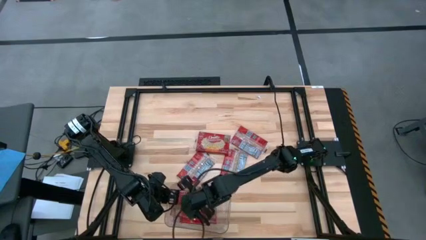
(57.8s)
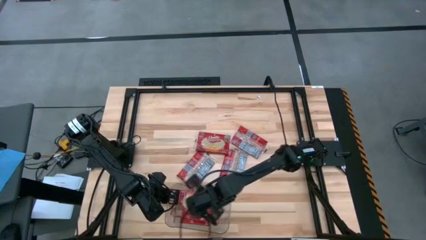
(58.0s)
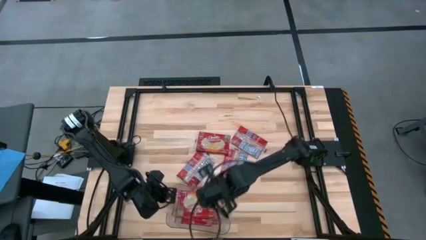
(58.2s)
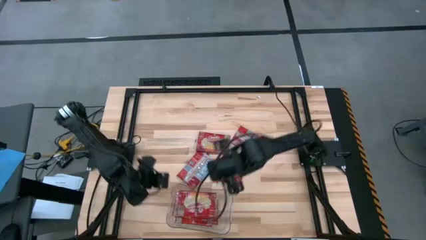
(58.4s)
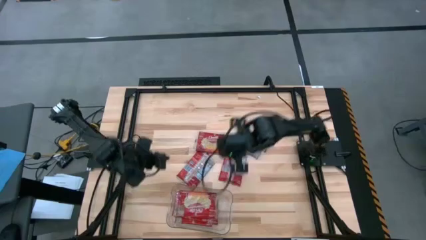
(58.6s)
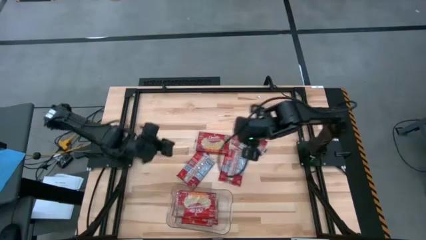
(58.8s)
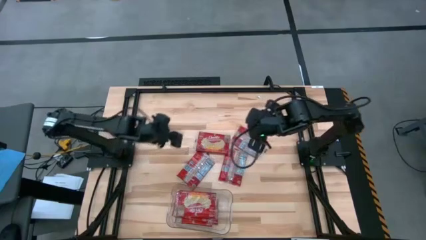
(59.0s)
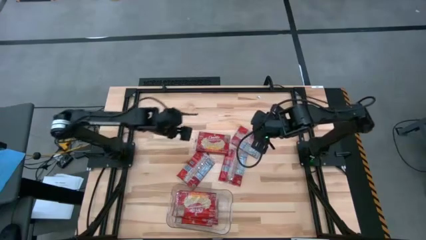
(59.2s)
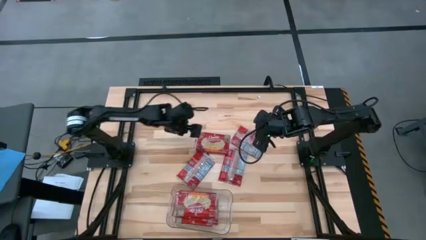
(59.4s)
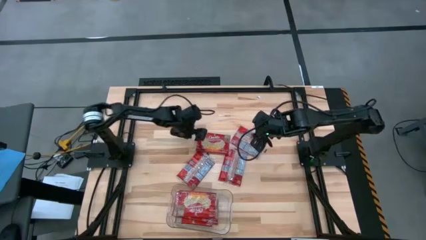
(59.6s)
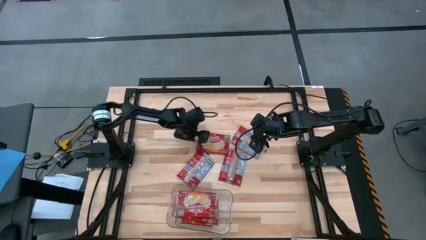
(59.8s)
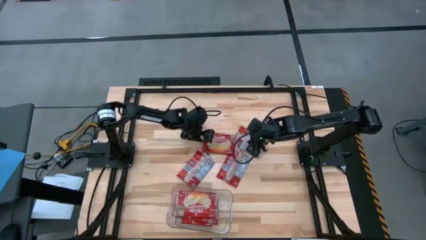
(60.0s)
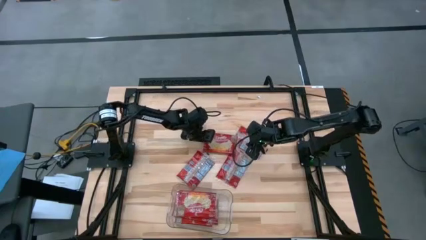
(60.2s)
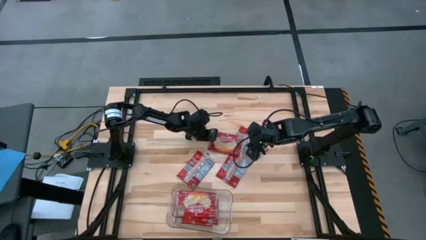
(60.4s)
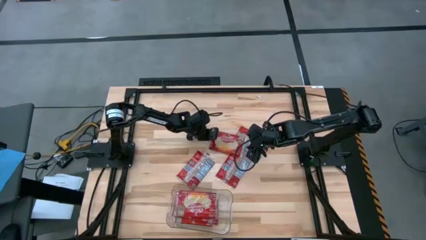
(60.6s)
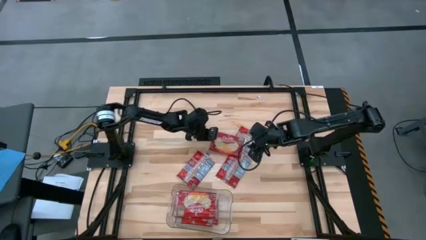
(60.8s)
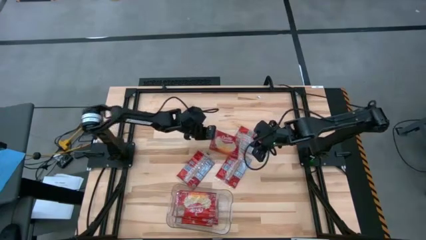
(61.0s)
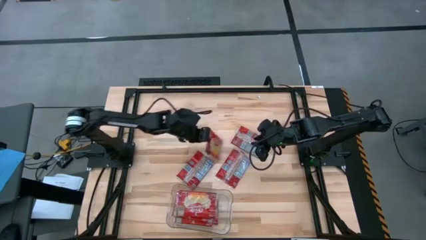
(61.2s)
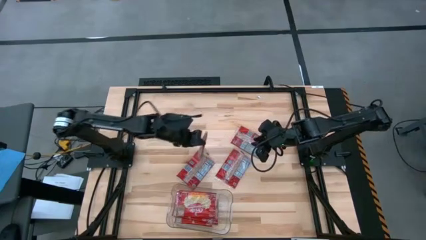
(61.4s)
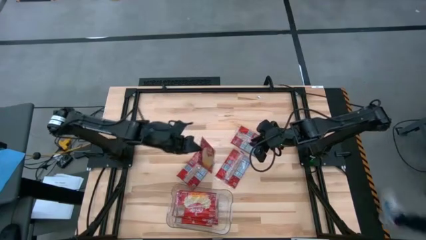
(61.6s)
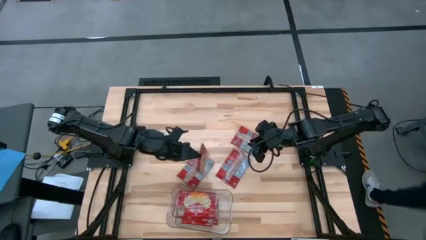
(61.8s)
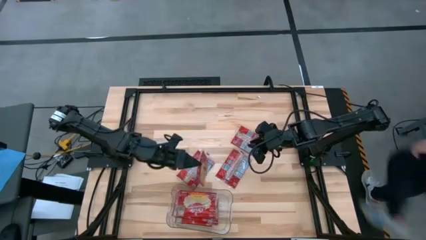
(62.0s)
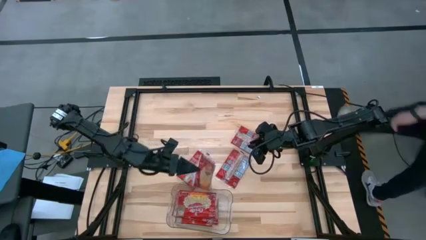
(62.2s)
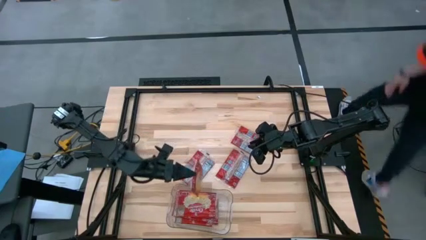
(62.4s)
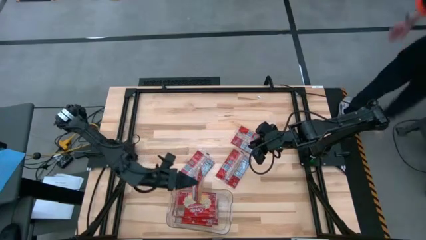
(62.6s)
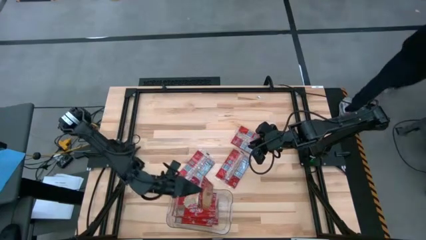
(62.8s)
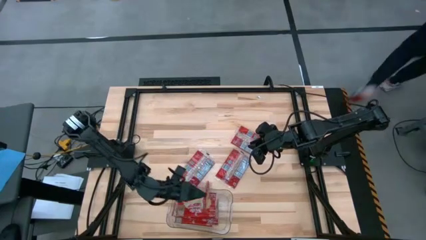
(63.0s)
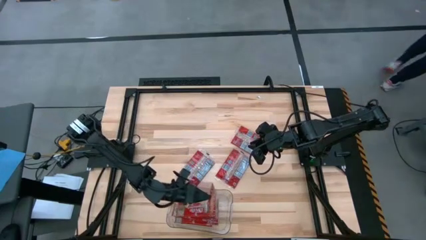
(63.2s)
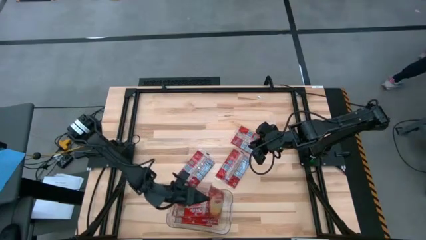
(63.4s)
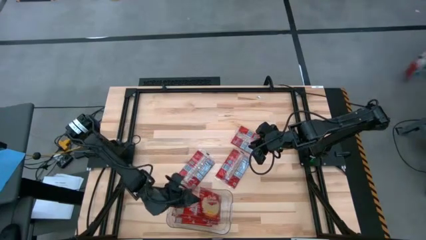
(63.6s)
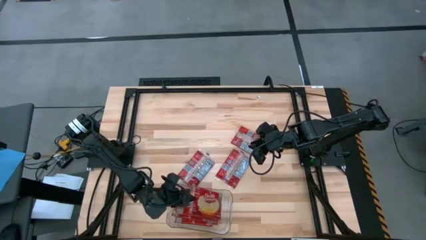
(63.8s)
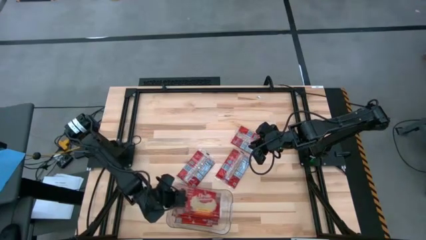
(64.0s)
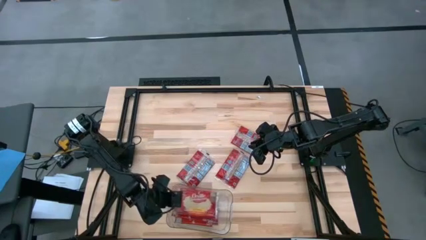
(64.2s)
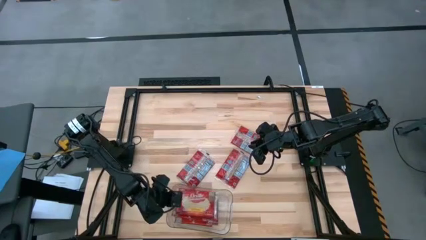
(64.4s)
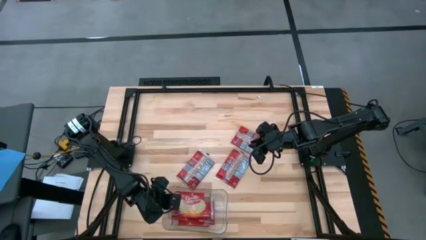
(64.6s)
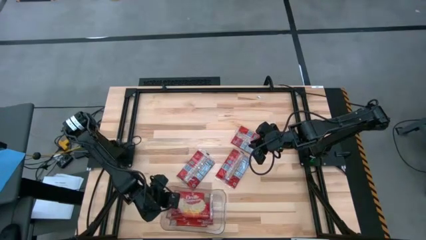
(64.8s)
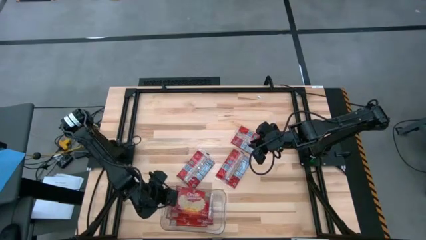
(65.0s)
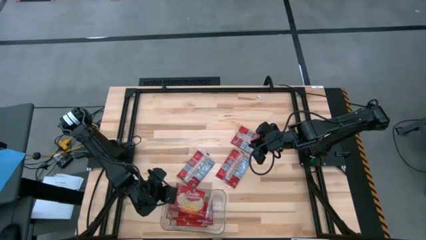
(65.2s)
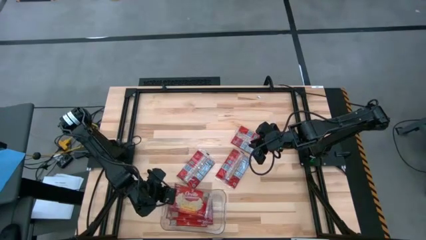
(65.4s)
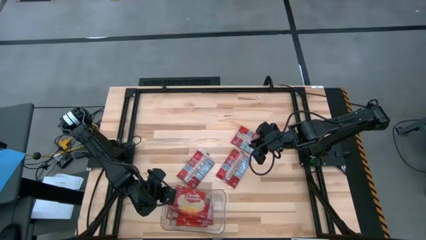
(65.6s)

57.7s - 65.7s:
Task: Sort popcorn bags into baskets
Put the red popcorn bag into the transparent bin

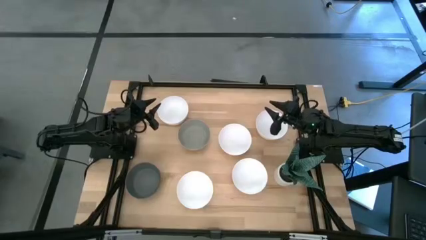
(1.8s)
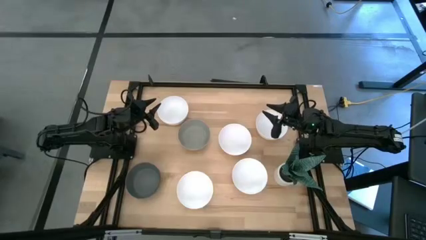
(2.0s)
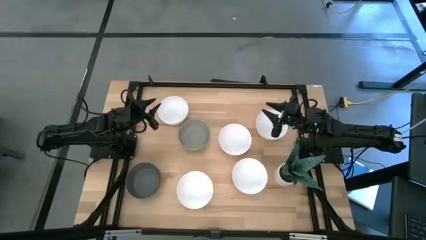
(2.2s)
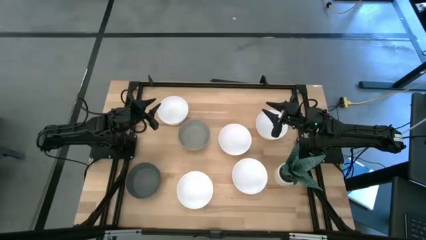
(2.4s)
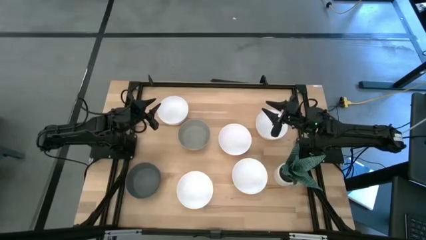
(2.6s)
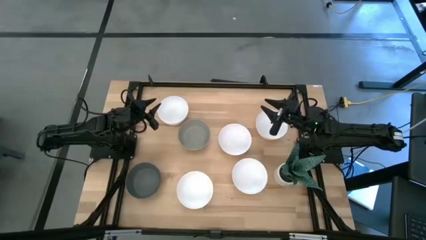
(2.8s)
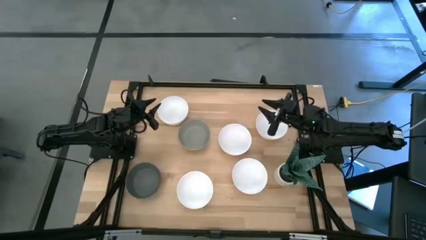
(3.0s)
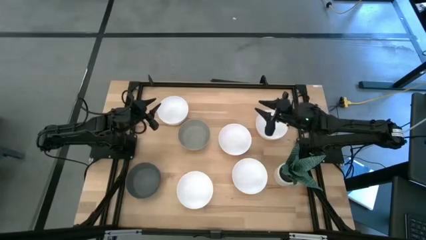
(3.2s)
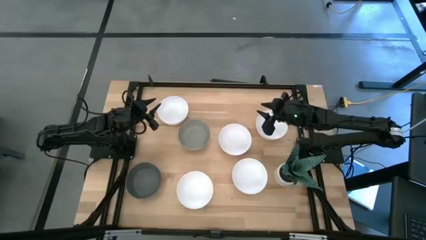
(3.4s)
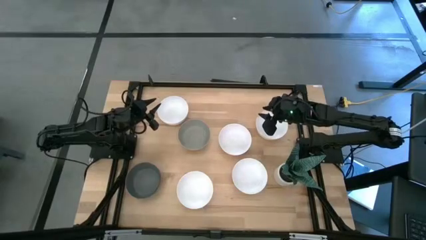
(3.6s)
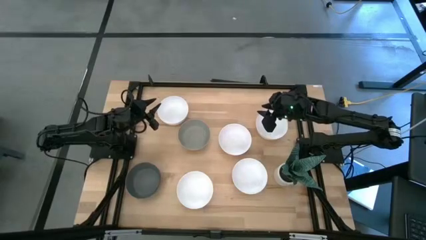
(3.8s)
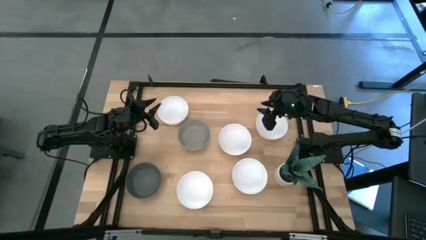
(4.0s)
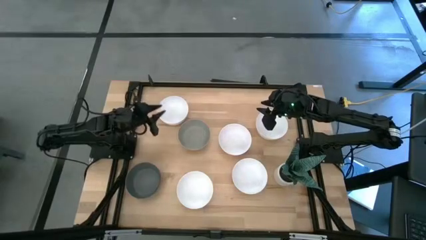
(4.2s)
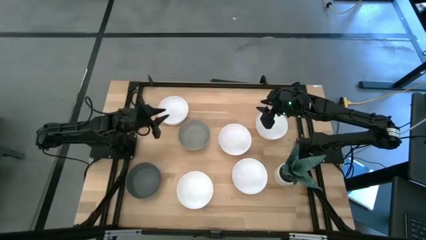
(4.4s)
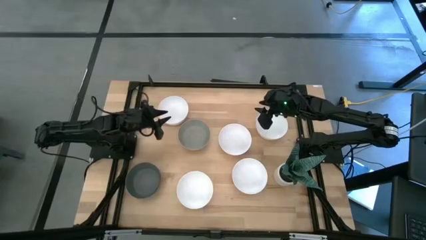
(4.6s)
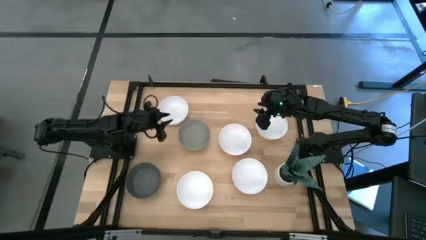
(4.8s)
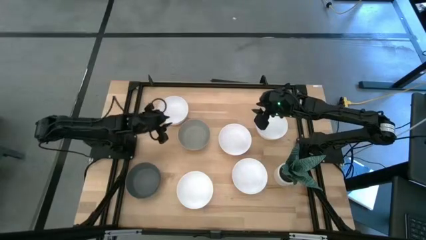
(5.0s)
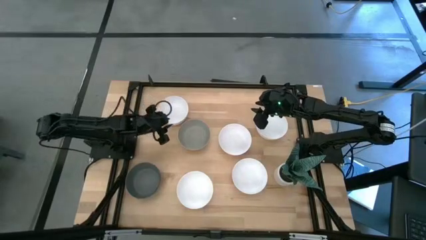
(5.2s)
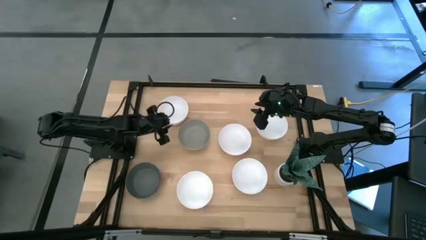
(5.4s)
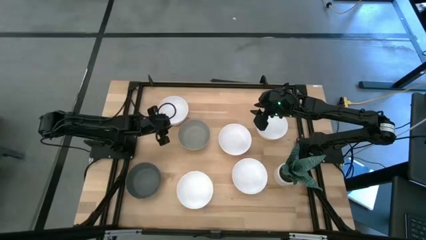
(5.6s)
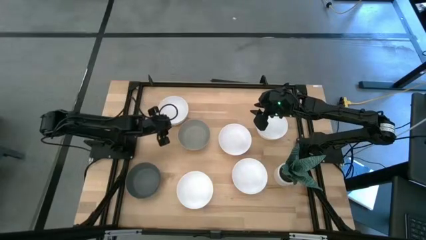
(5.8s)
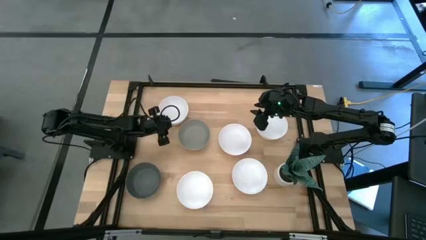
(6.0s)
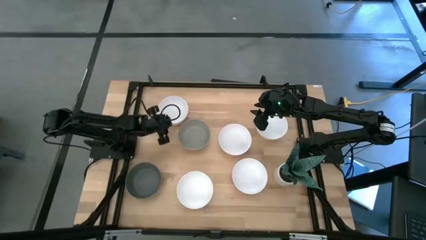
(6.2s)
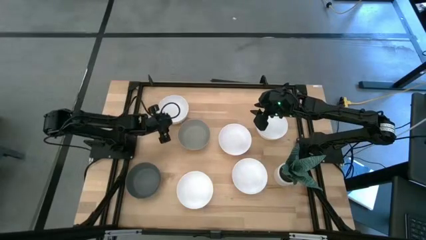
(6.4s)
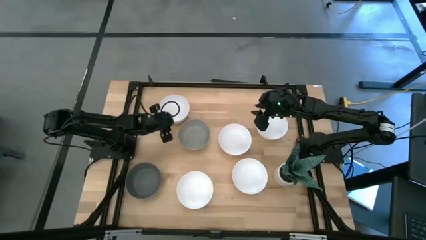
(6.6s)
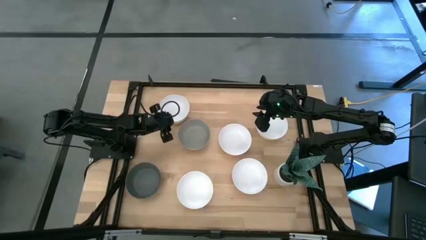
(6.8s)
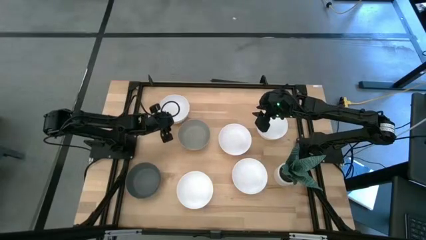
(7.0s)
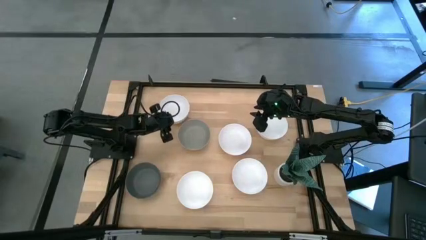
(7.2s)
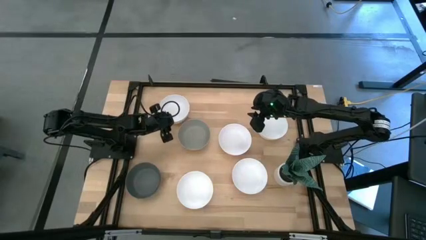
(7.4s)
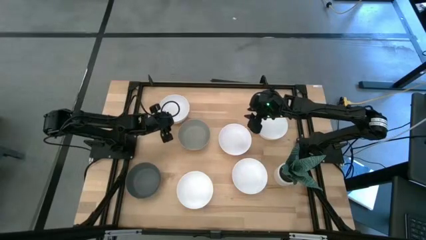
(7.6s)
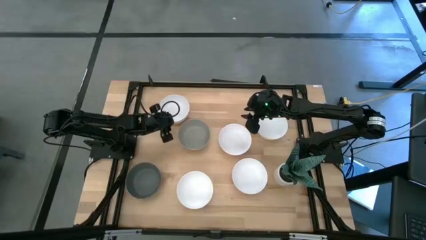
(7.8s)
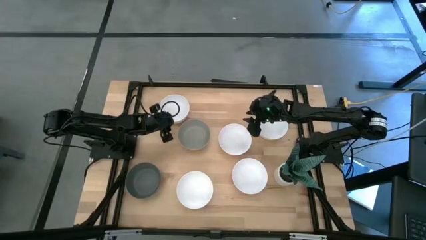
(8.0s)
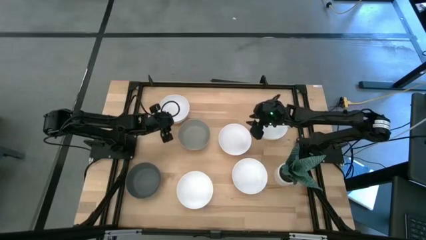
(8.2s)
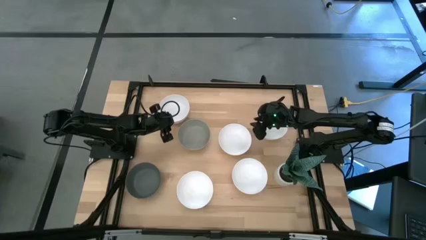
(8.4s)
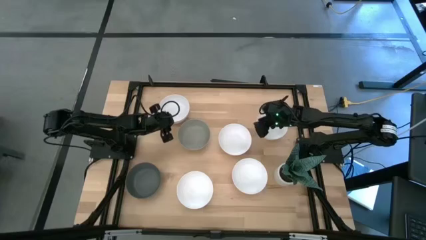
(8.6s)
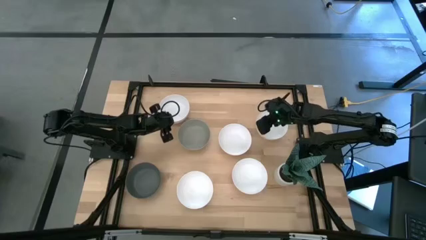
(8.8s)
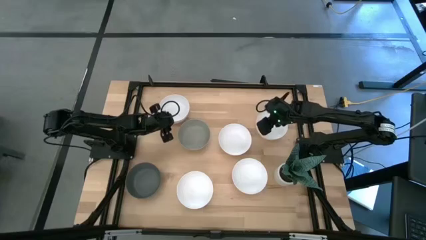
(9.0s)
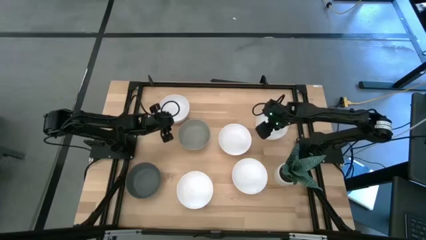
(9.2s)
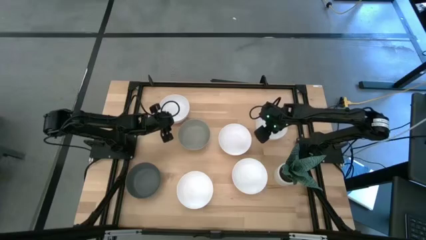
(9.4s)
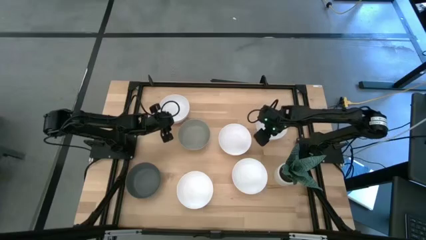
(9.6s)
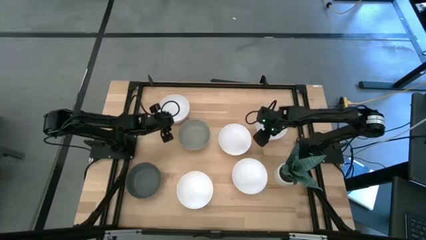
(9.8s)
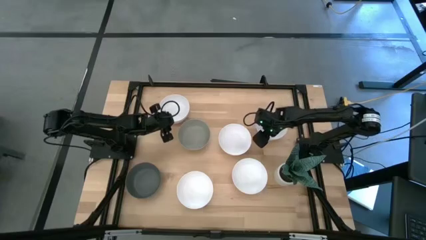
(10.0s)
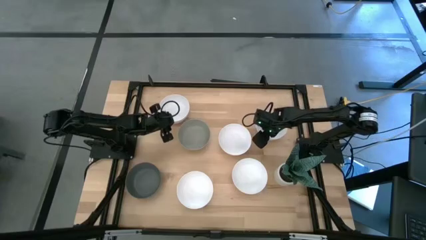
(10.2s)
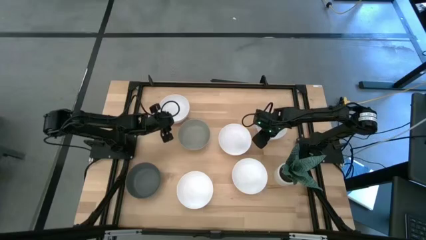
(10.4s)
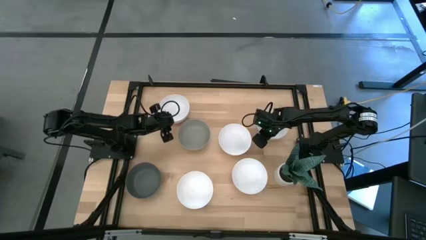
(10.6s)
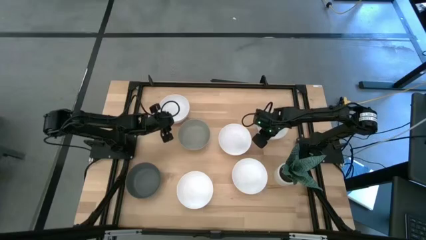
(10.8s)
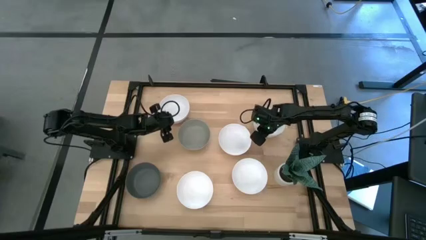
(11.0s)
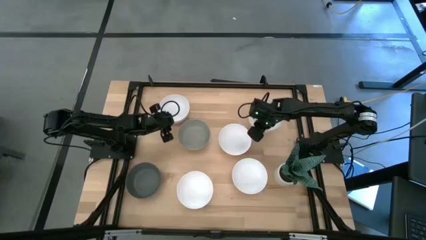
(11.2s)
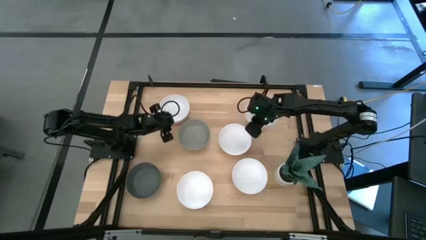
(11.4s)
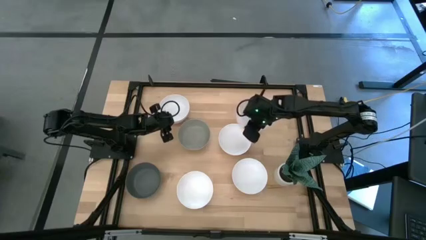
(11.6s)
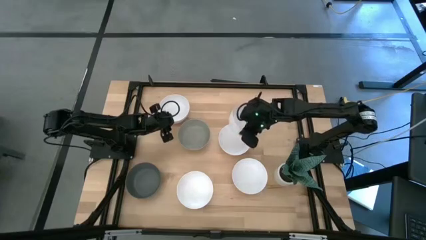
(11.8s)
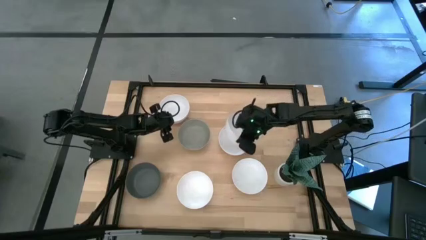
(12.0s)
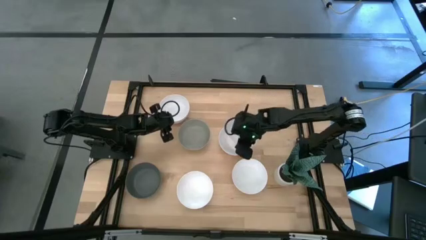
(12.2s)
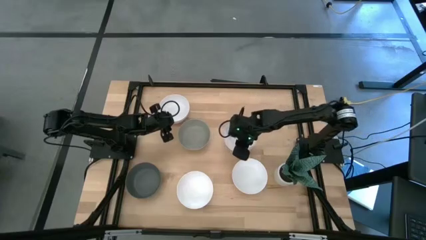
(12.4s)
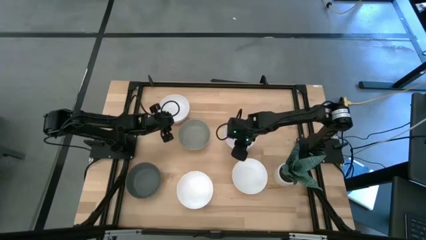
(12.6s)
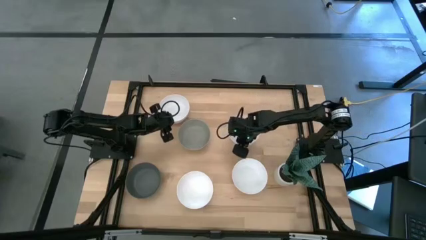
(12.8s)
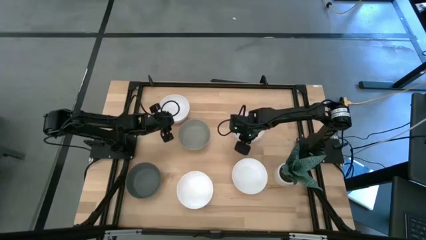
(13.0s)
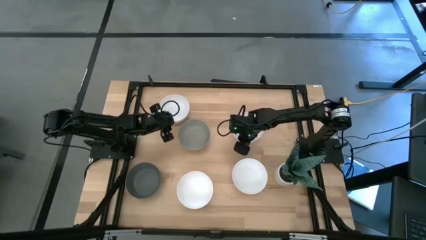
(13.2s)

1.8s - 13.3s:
Task: Nest bowls inside each other
Stack the white bowl on top of the white bowl
